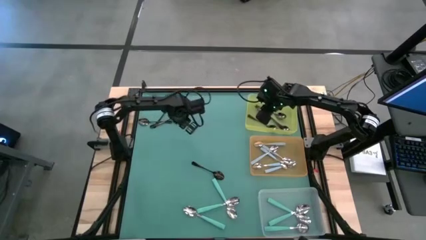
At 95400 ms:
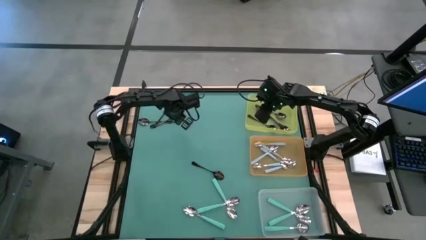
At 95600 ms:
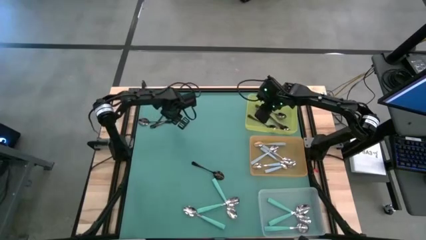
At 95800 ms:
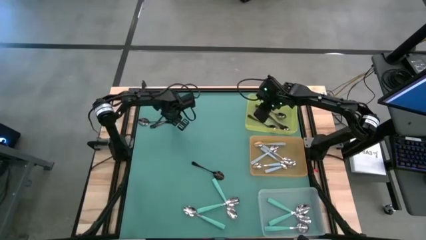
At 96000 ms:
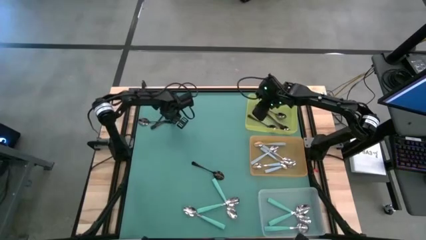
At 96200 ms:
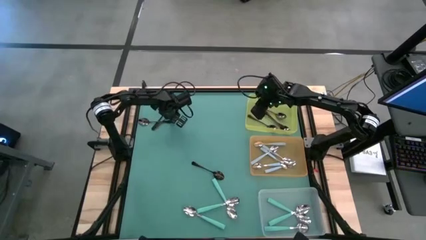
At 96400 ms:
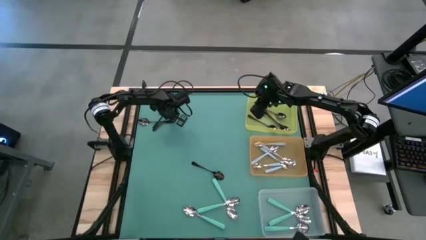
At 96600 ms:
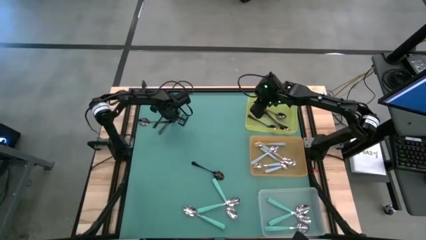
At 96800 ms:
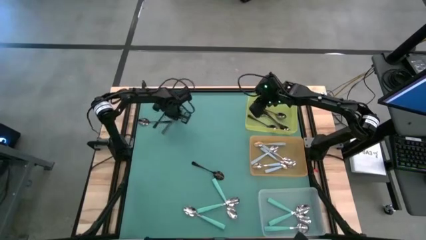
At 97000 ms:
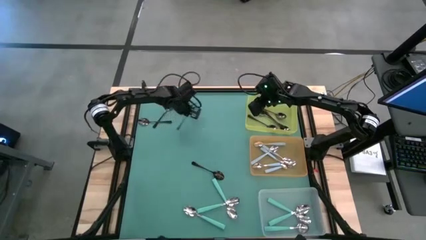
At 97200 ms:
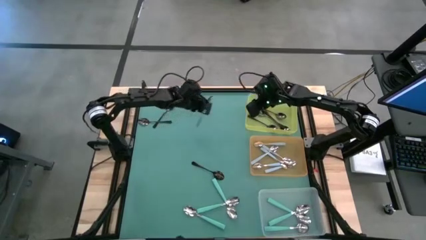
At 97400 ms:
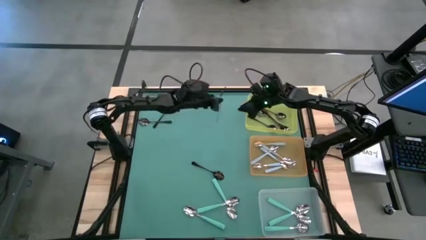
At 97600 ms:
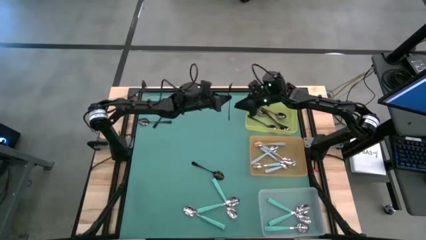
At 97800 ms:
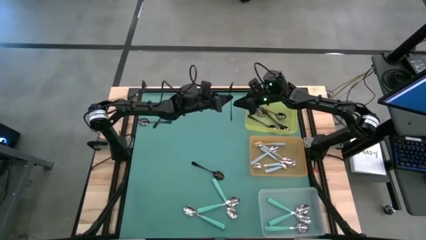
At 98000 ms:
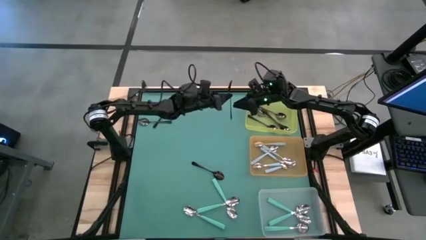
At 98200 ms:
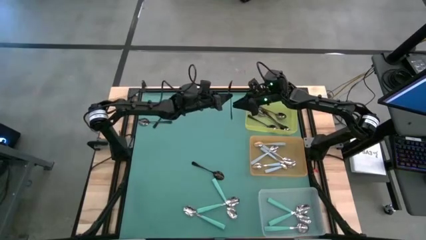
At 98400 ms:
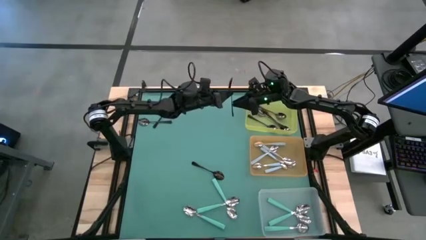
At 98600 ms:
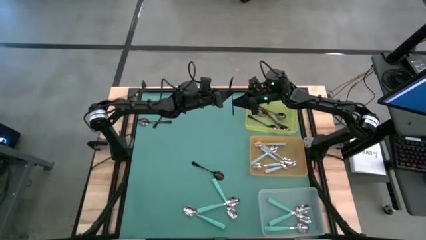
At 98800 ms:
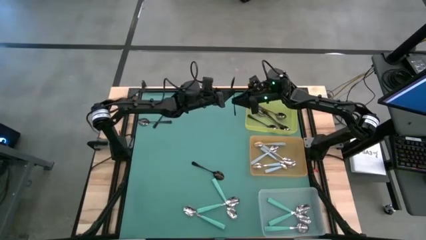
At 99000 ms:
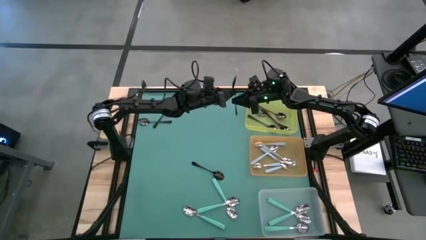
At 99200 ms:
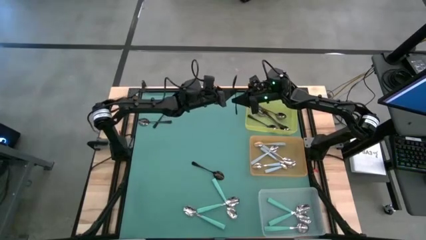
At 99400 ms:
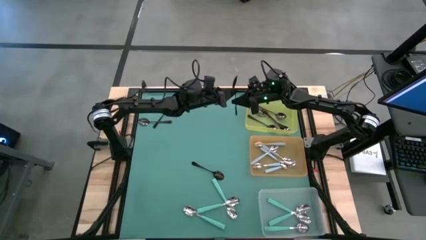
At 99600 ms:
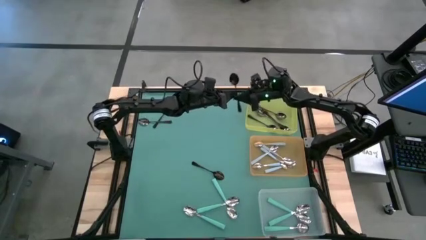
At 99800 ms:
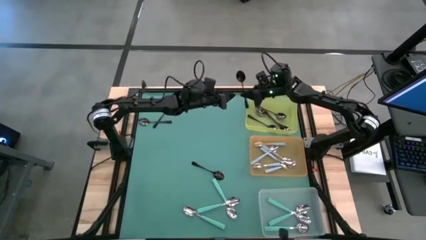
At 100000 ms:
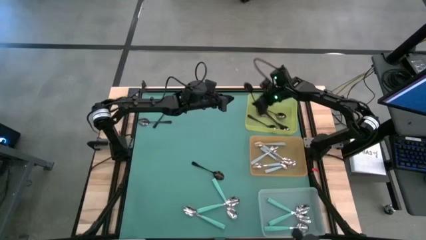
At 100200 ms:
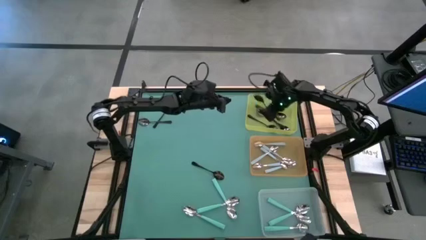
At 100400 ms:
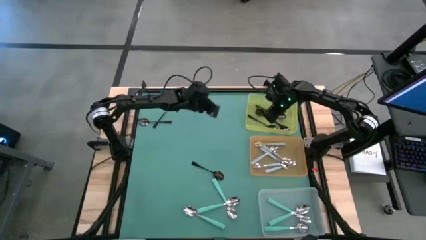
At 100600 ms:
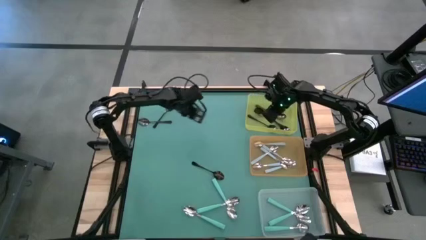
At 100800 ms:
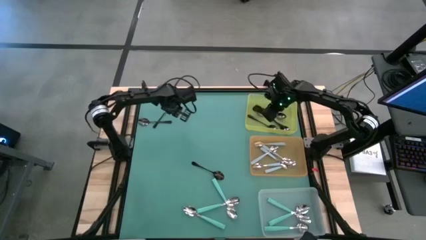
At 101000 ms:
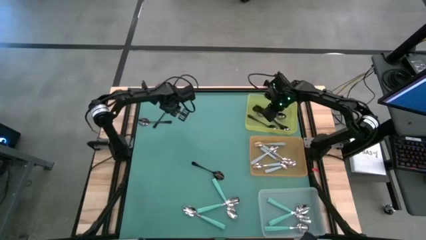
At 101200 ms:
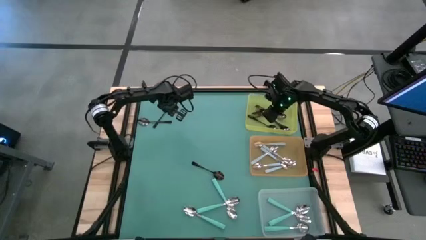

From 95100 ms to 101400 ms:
Task: Sort silverware by color (type)
Put the black spoon into the yellow bin

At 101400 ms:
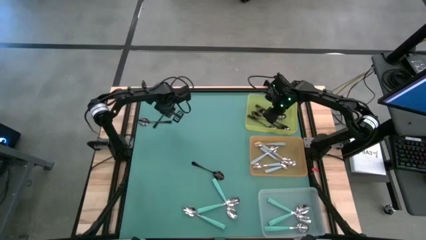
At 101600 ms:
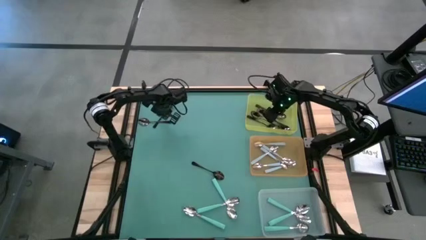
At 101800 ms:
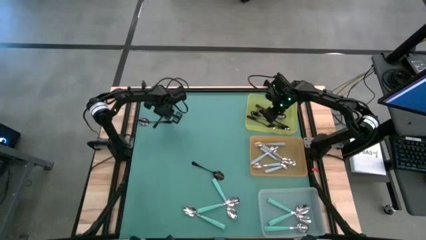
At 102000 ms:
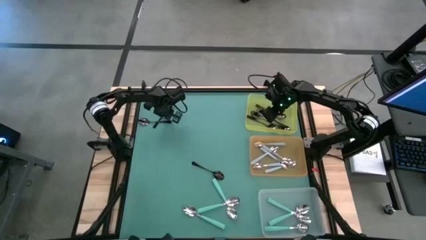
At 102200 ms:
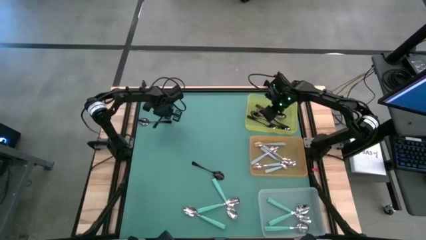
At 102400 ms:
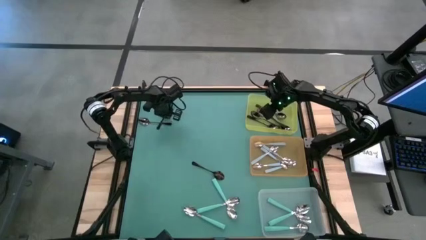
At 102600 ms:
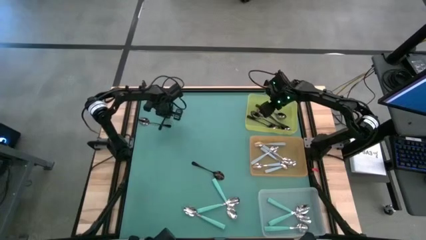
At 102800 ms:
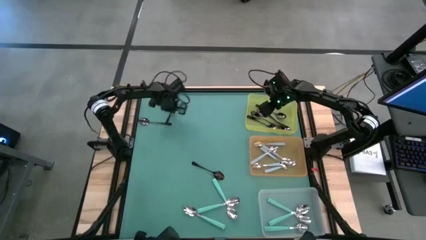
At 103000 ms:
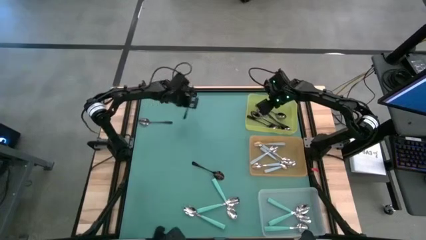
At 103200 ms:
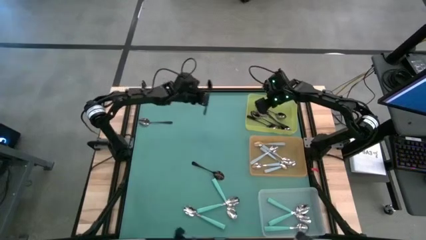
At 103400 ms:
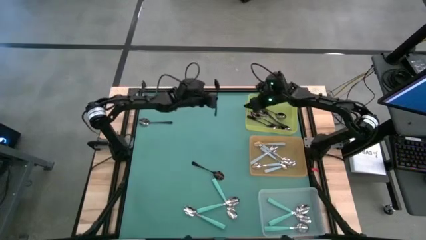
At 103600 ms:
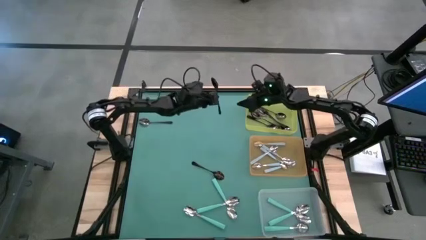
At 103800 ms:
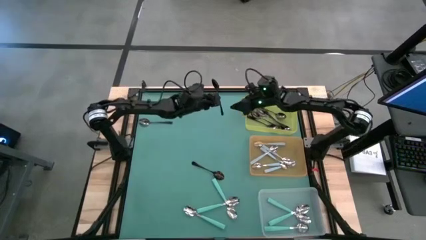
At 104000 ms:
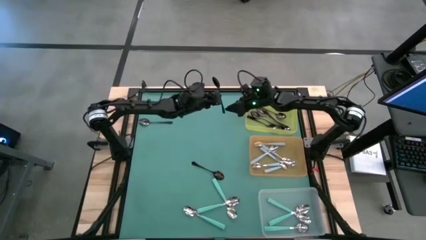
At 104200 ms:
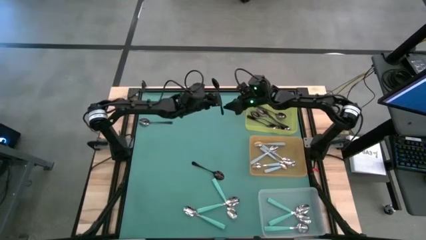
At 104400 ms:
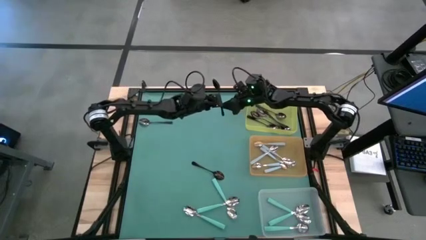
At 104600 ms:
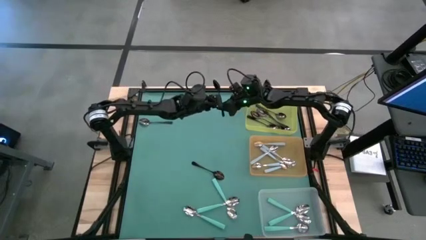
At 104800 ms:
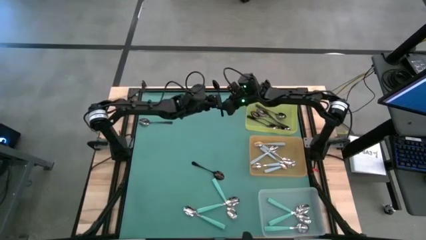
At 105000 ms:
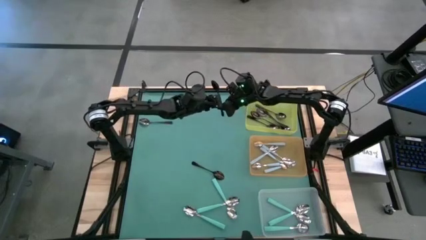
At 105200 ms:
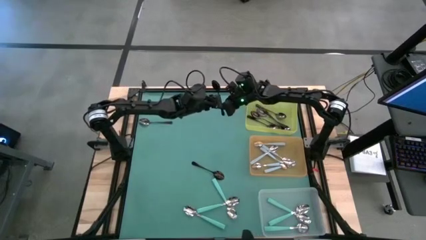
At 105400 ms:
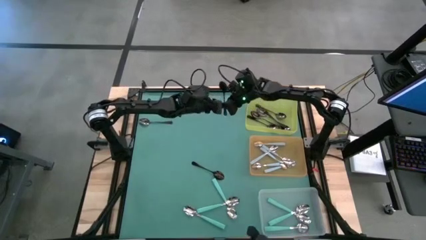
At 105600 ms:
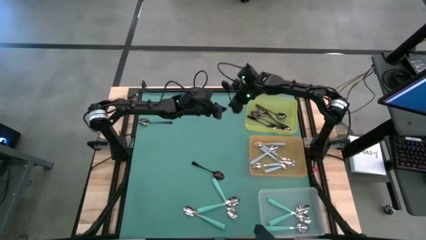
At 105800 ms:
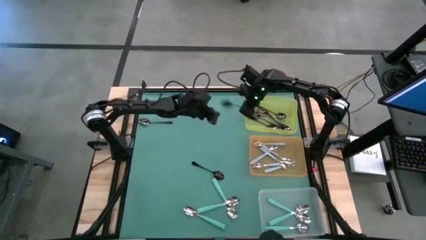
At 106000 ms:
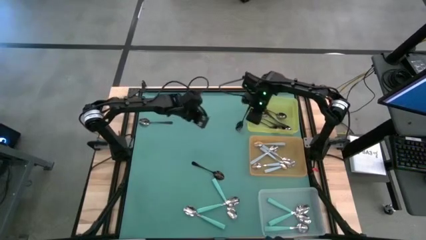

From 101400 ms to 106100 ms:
Put the black spoon into the yellow bin

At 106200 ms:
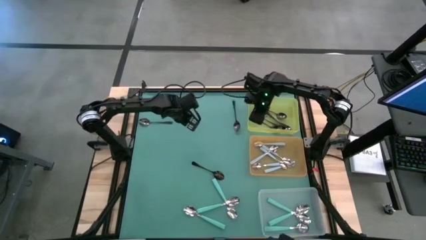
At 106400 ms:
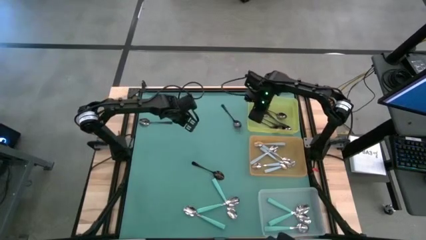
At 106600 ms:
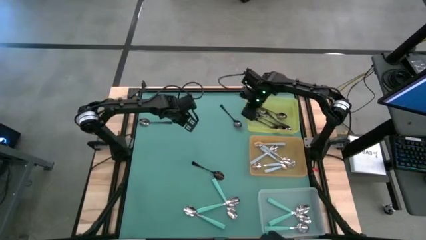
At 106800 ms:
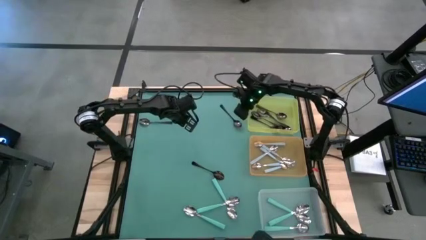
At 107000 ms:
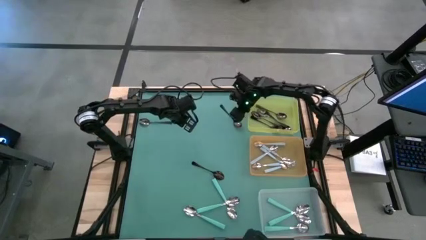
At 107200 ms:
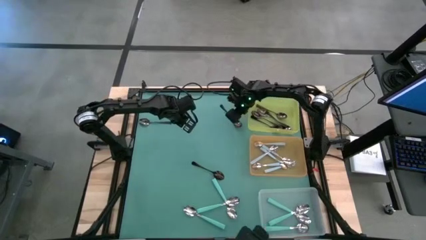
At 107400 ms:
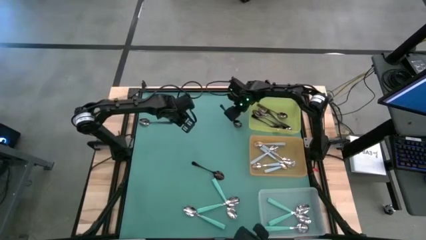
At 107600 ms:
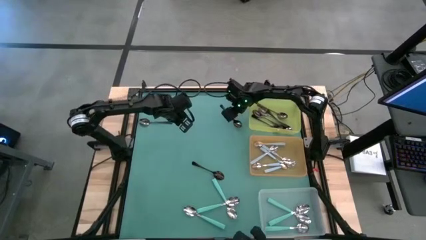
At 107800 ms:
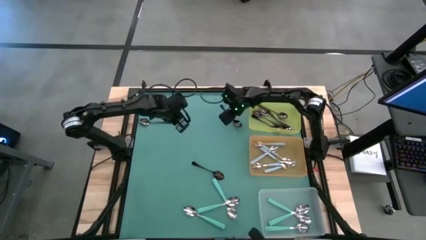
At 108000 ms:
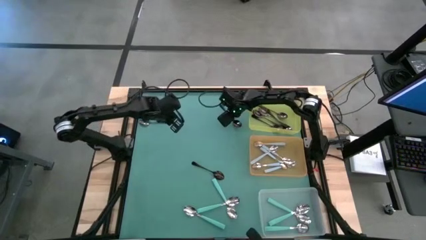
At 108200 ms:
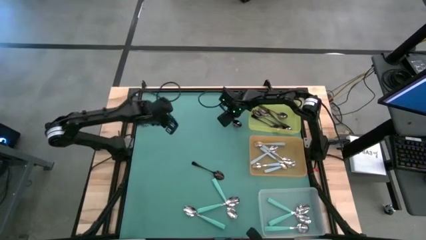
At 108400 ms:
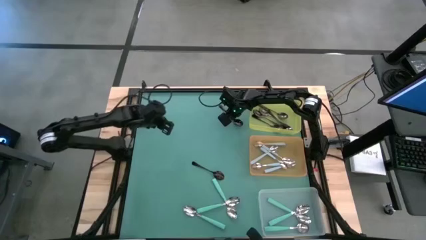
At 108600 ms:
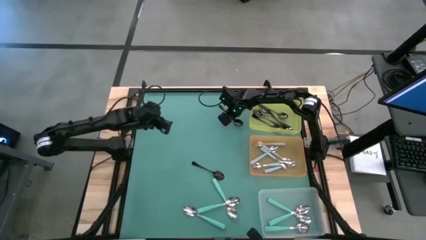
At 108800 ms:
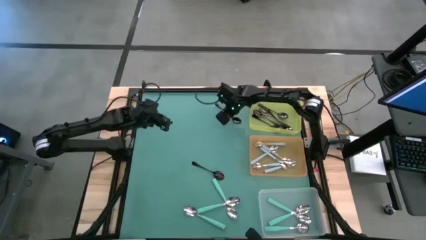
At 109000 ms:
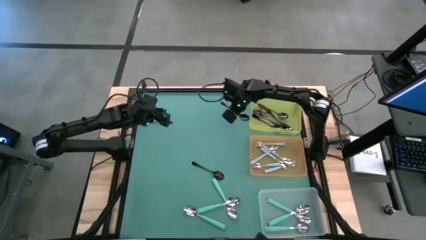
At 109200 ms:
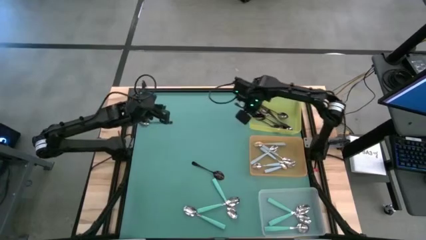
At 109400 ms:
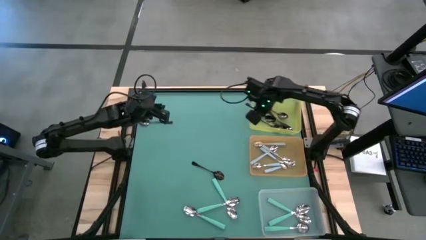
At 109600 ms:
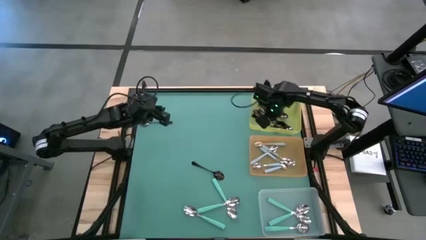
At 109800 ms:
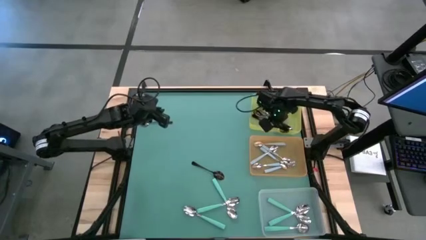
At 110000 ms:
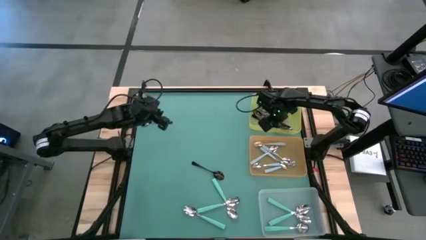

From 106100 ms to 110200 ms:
Put the black spoon into the yellow bin
